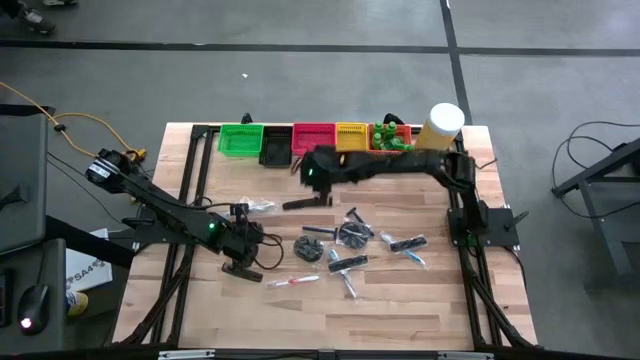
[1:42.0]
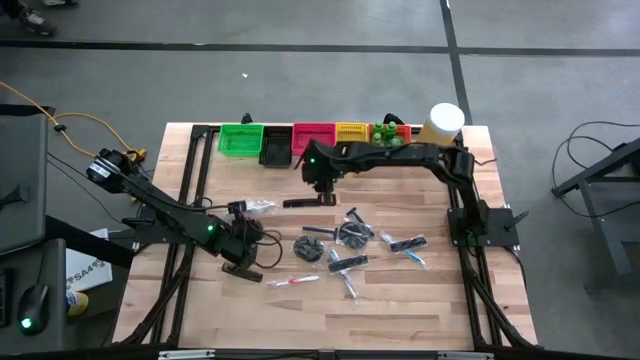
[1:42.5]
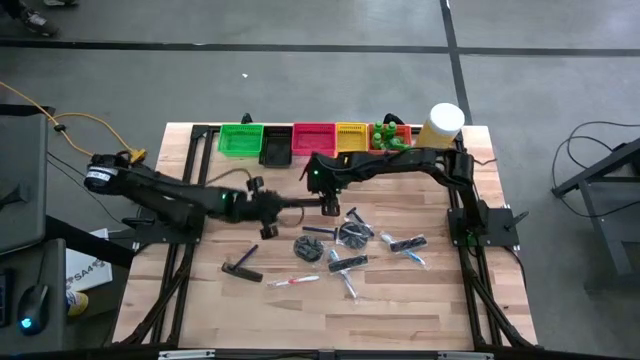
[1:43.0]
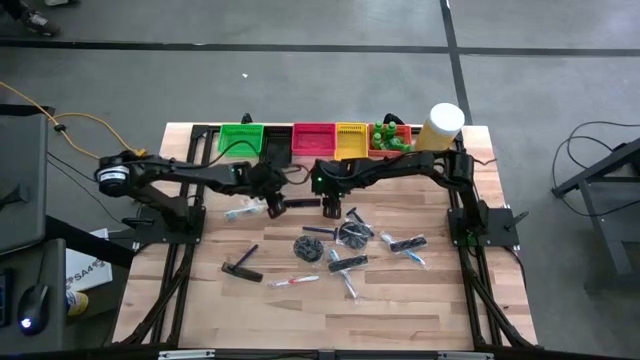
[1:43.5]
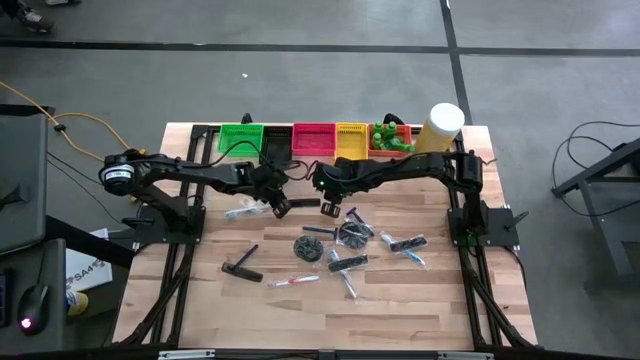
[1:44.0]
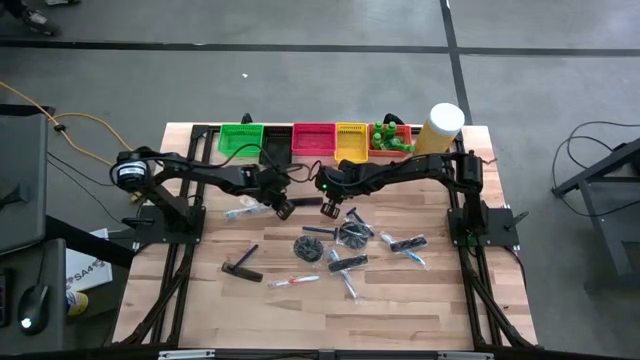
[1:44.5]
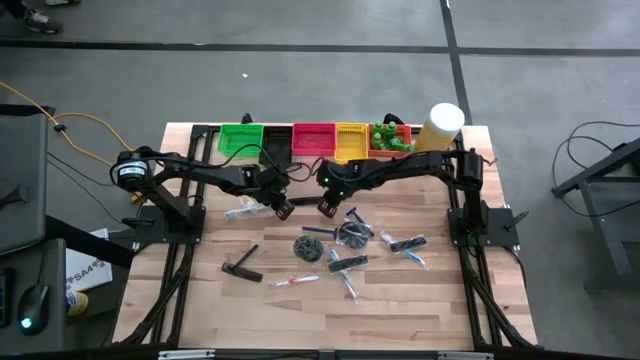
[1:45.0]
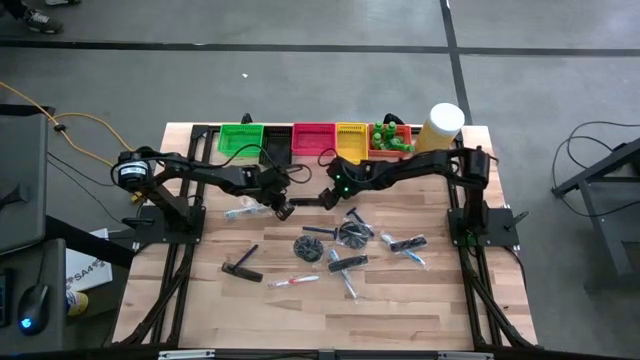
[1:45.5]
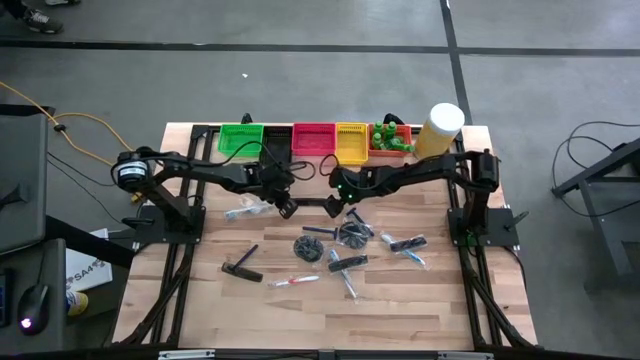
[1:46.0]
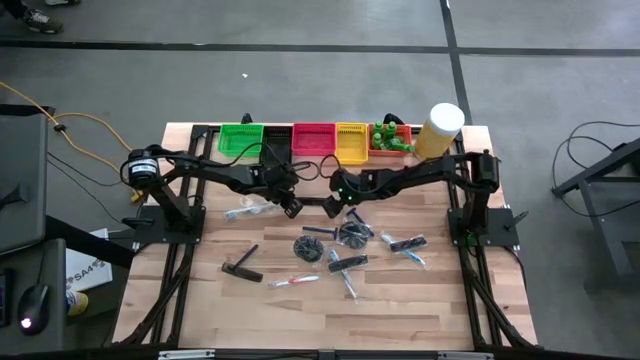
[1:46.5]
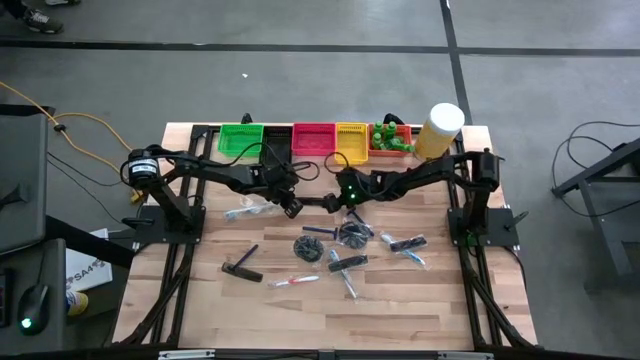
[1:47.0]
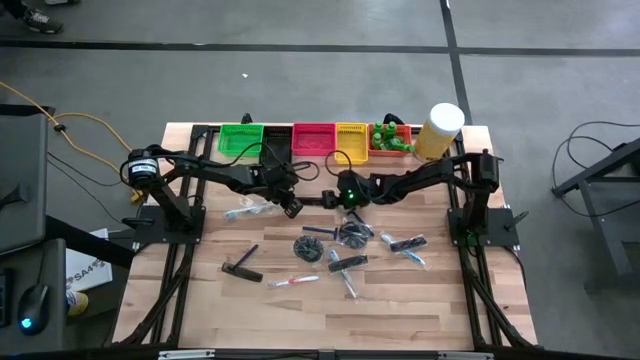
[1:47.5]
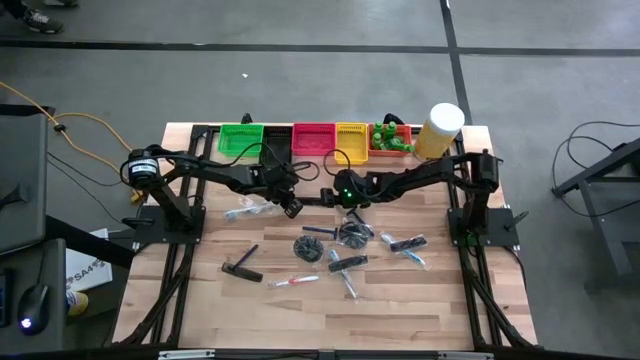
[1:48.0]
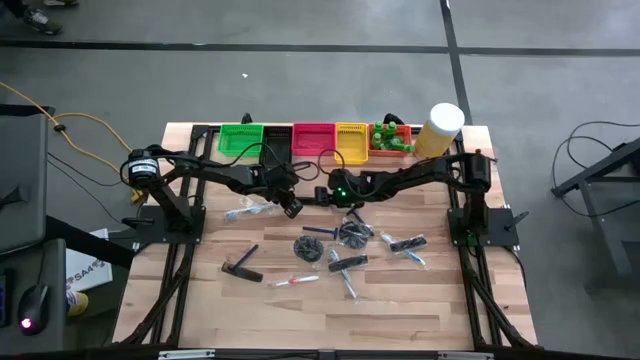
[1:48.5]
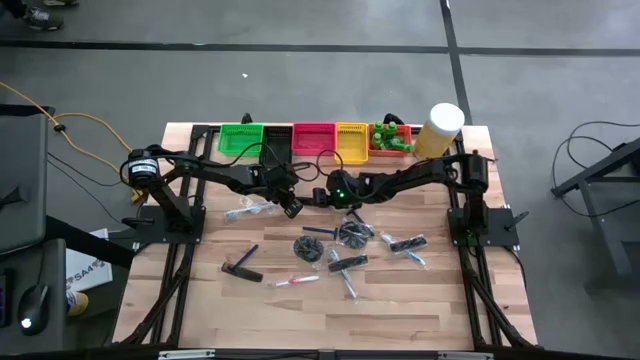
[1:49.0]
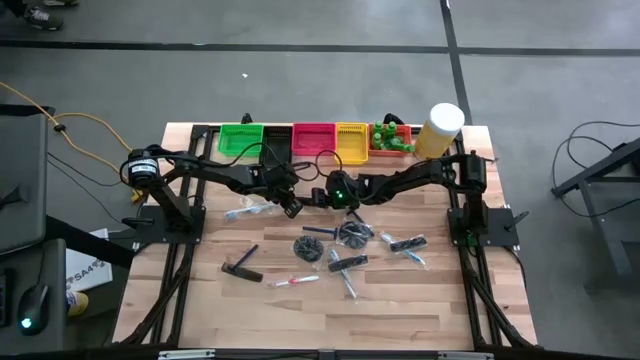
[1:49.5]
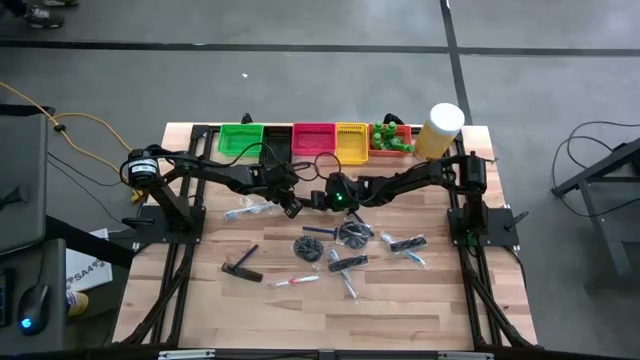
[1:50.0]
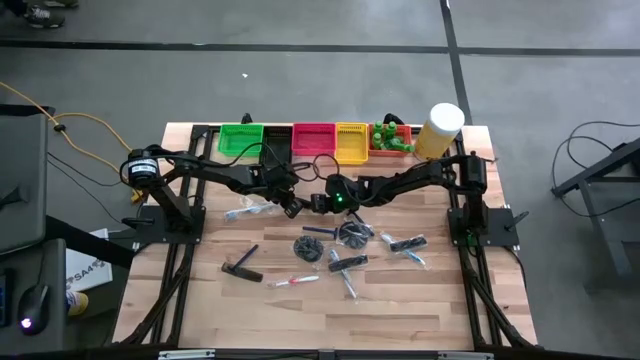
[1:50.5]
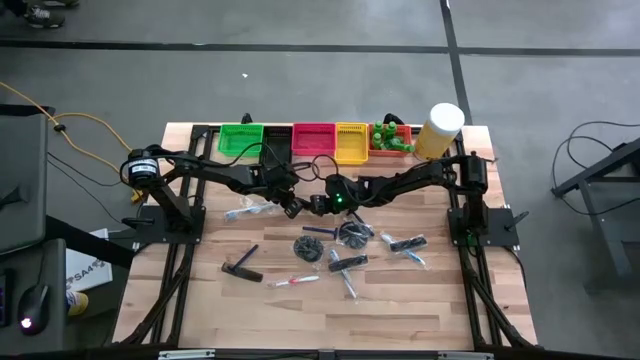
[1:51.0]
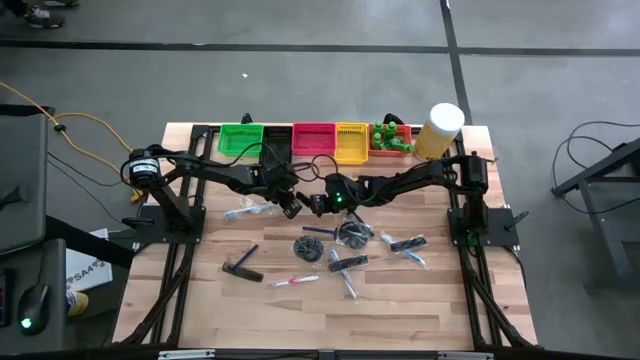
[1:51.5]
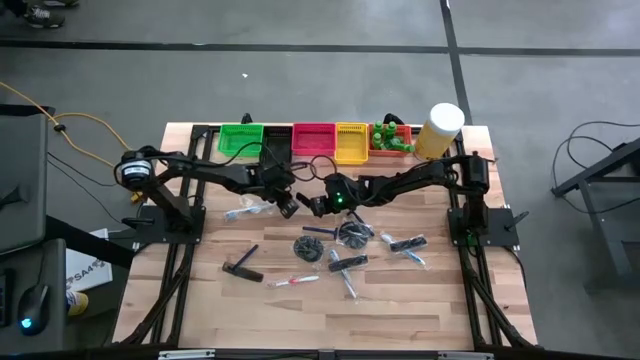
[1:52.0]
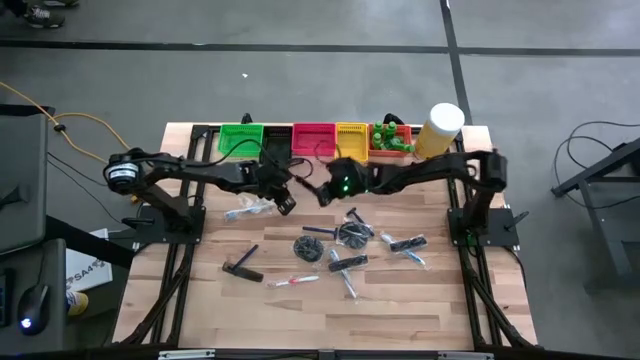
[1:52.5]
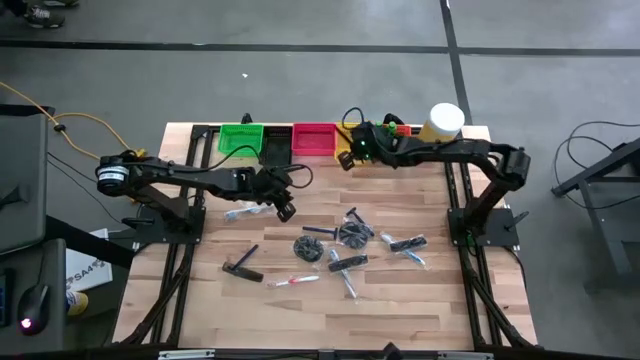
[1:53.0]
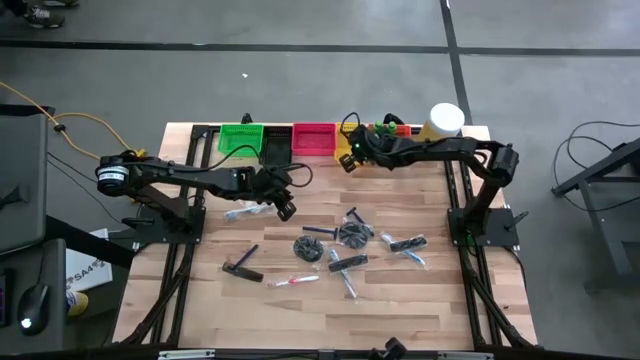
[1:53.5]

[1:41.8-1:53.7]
Task: Pick & Place Travel size toiletries
Put the black hair comb into the yellow basket

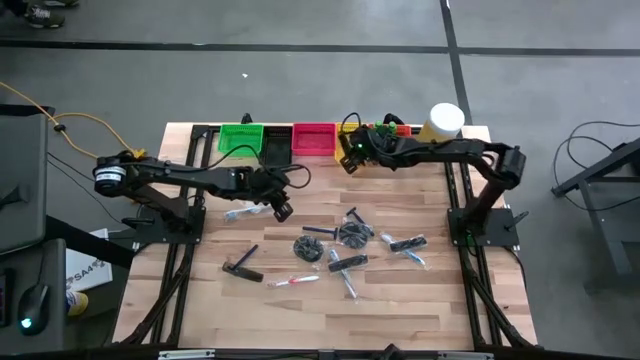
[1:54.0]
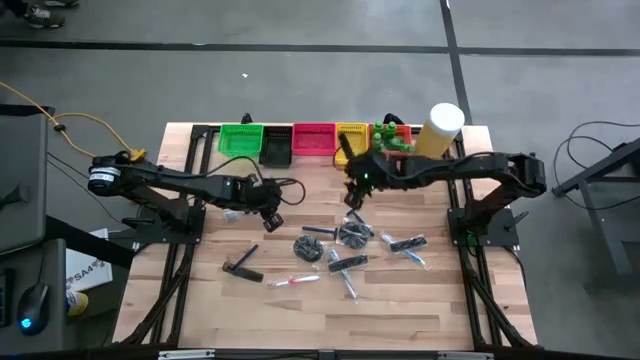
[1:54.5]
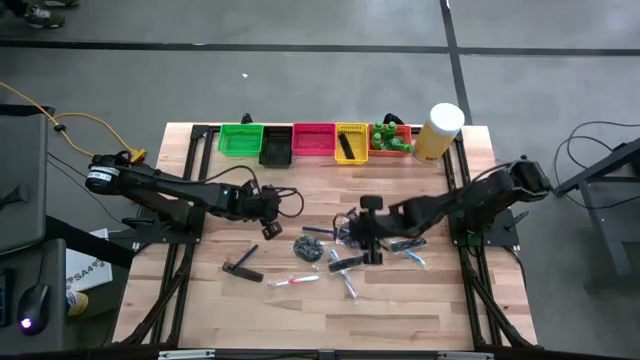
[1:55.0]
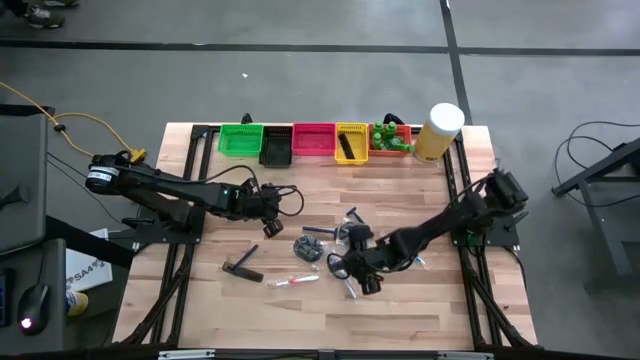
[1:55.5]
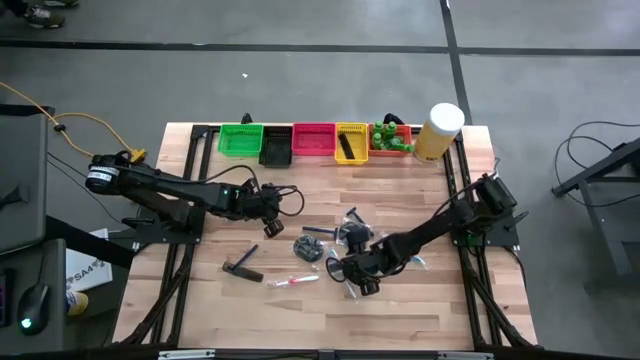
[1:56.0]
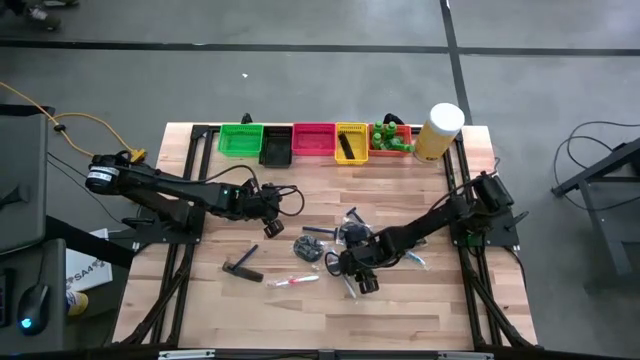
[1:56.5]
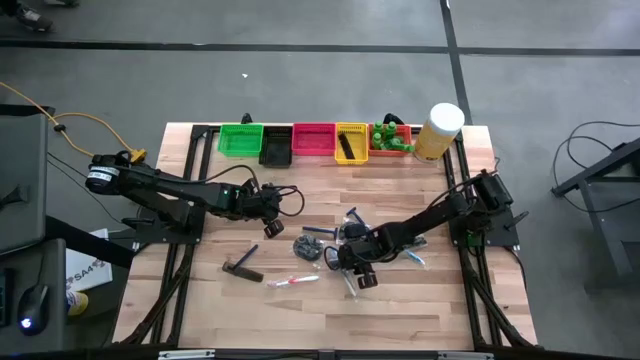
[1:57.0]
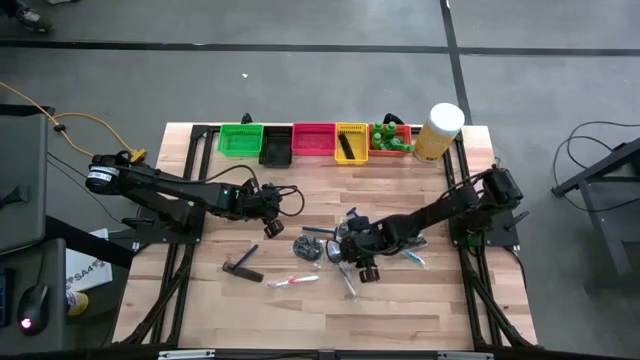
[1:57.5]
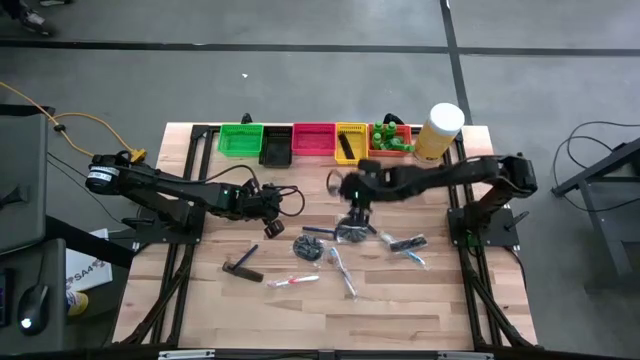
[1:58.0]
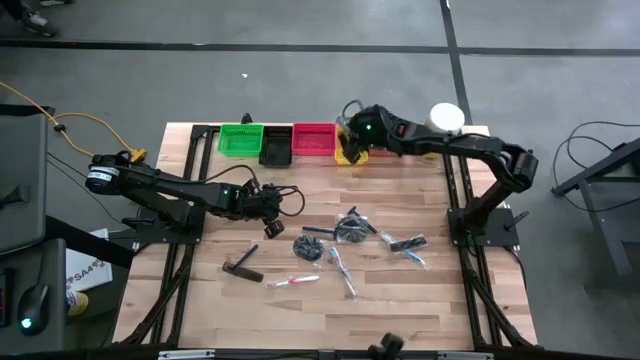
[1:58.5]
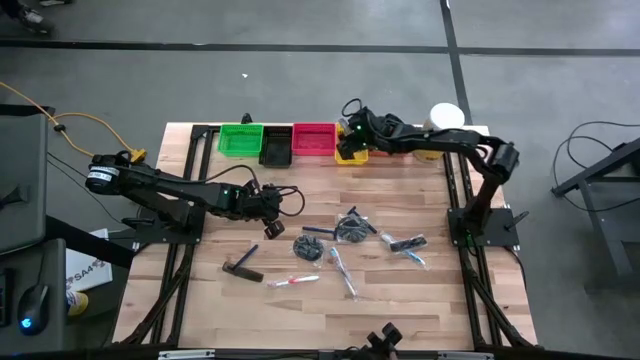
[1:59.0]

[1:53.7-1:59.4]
Put the black hair comb into the yellow basket

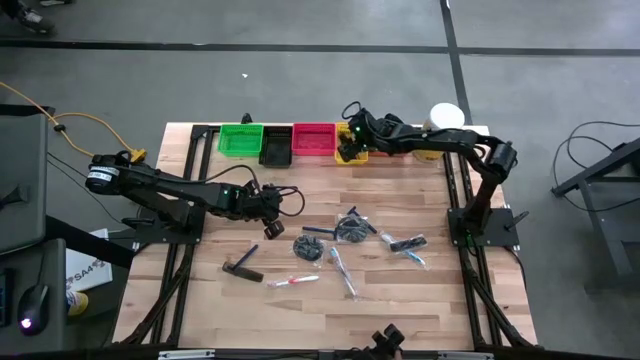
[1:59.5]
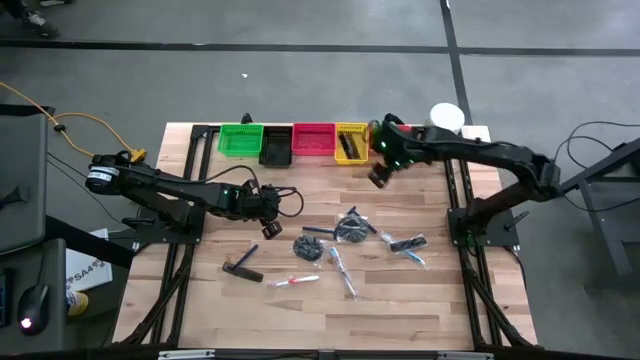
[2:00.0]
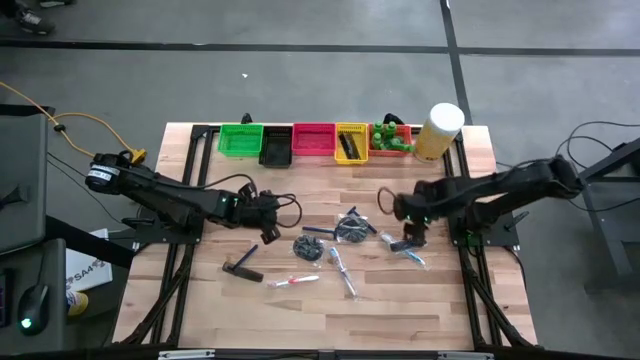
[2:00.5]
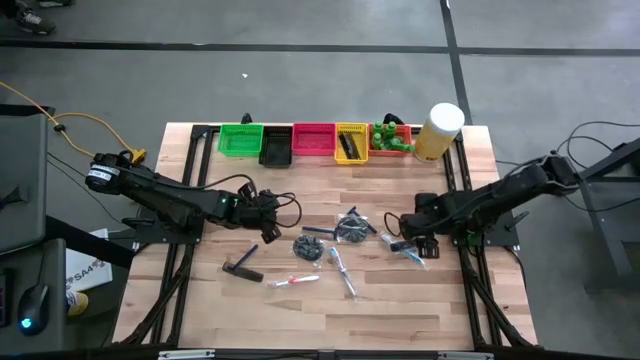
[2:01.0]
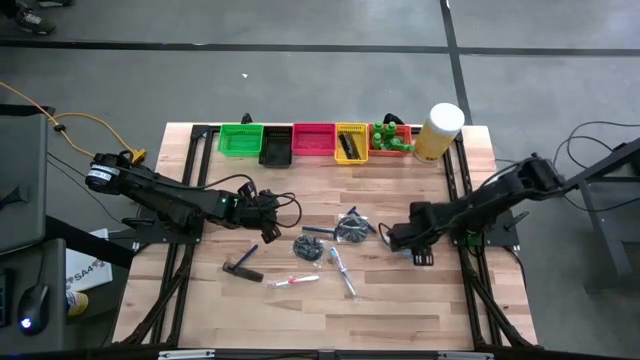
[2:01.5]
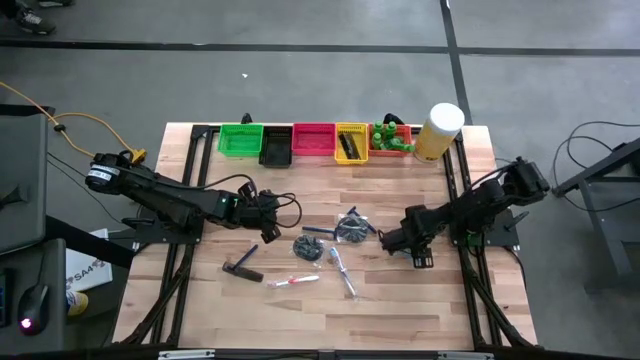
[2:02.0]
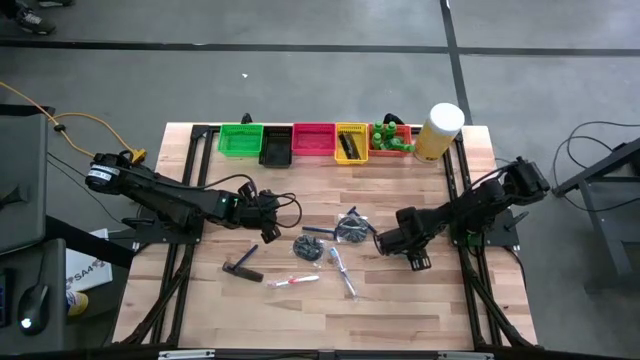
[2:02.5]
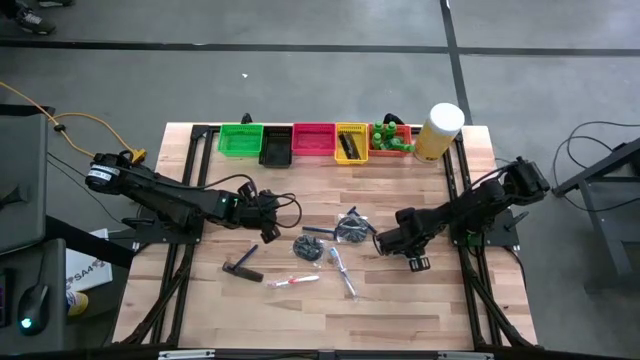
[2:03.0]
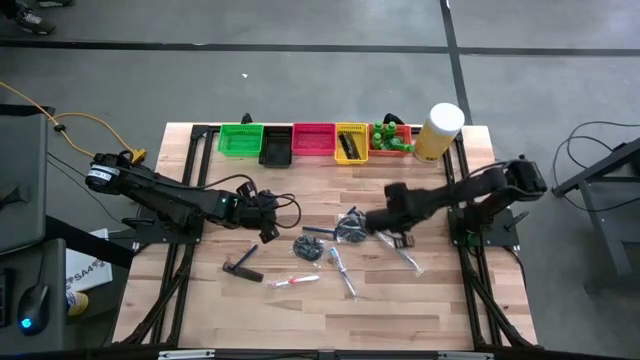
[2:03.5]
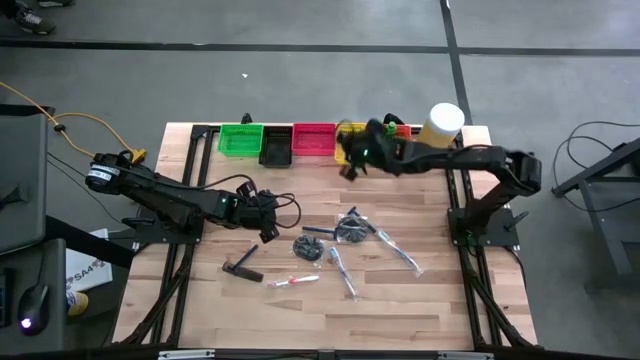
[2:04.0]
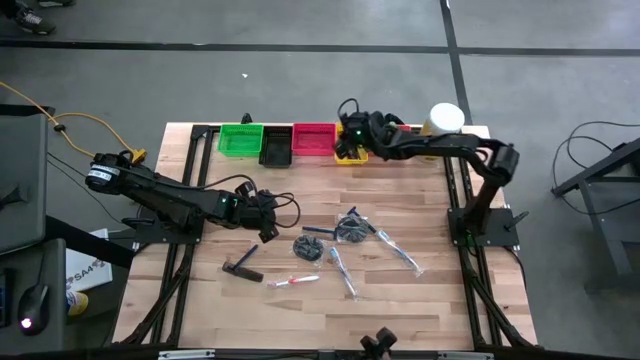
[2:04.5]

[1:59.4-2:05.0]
Put the black hair comb into the yellow basket
